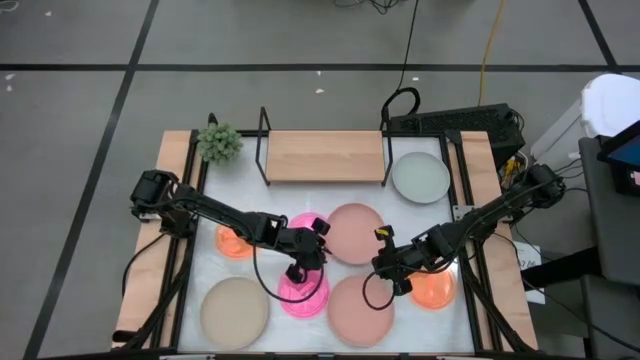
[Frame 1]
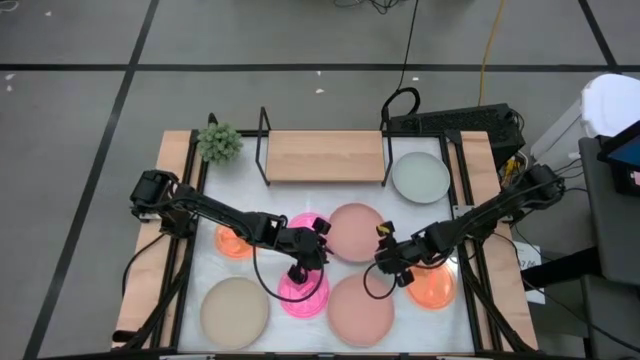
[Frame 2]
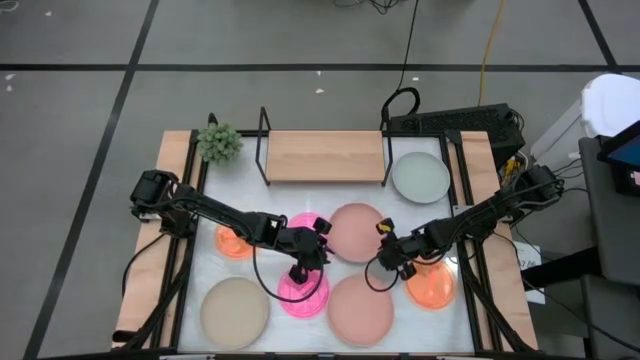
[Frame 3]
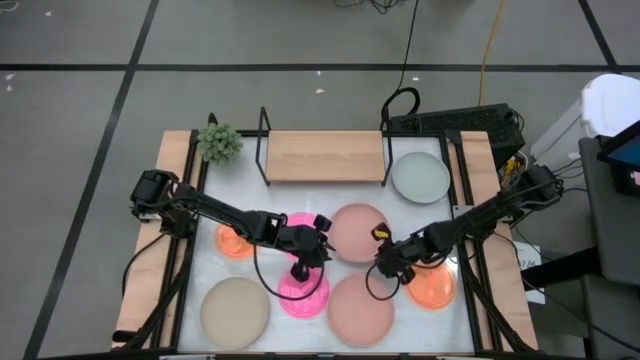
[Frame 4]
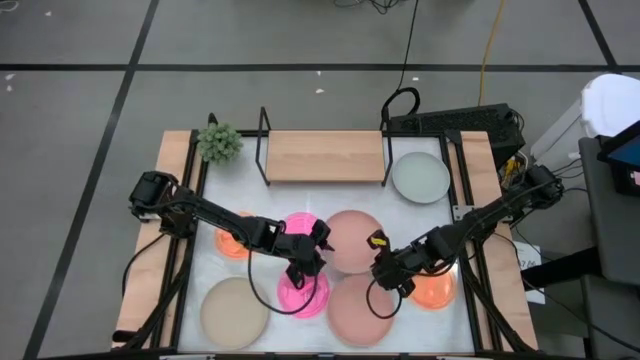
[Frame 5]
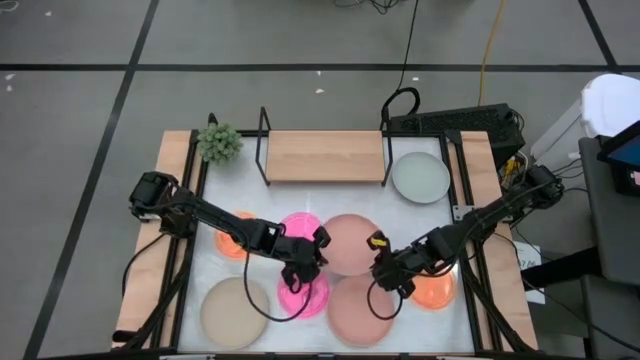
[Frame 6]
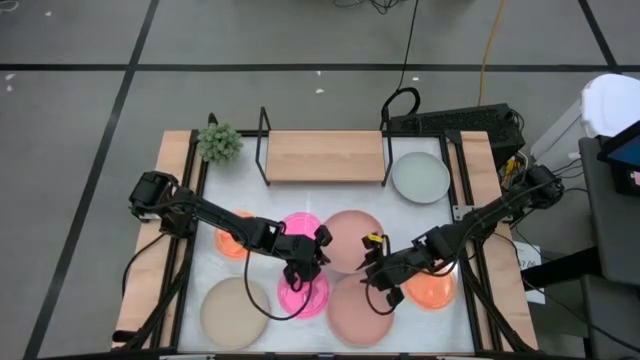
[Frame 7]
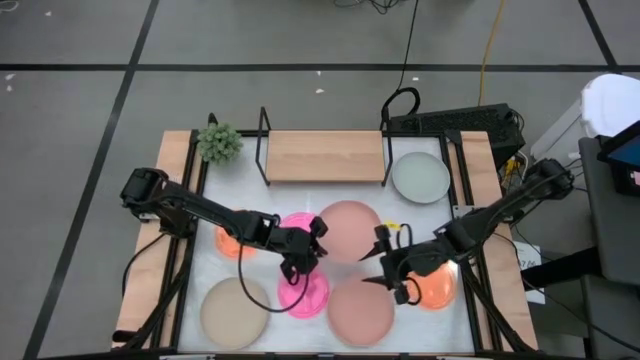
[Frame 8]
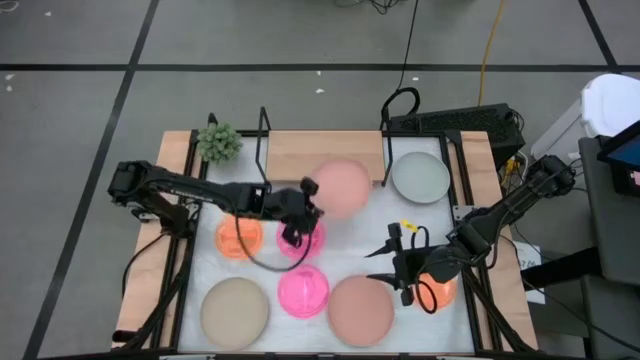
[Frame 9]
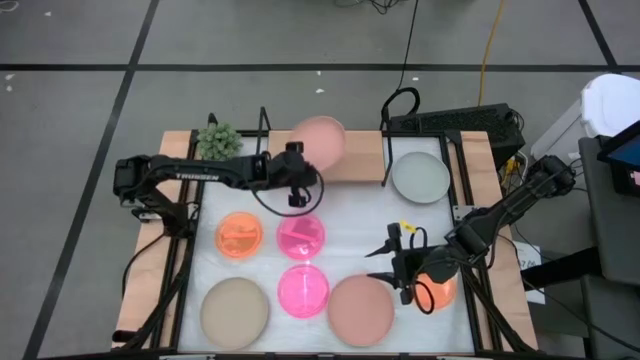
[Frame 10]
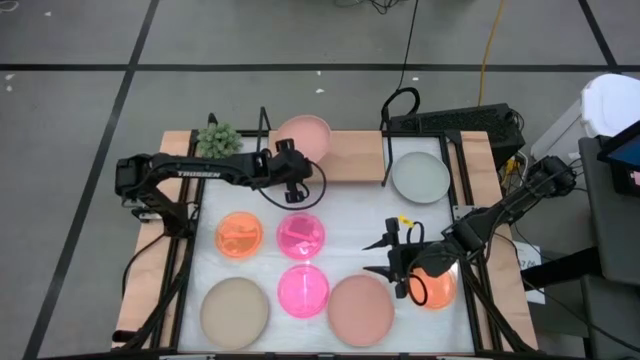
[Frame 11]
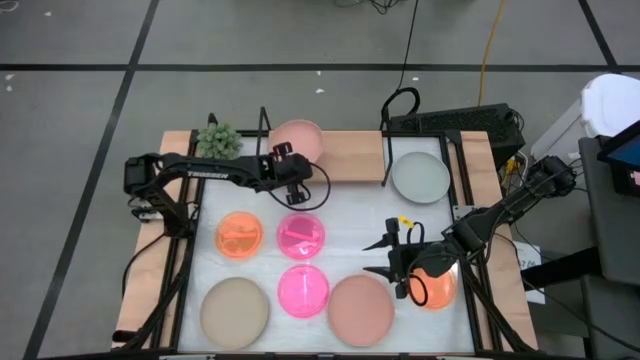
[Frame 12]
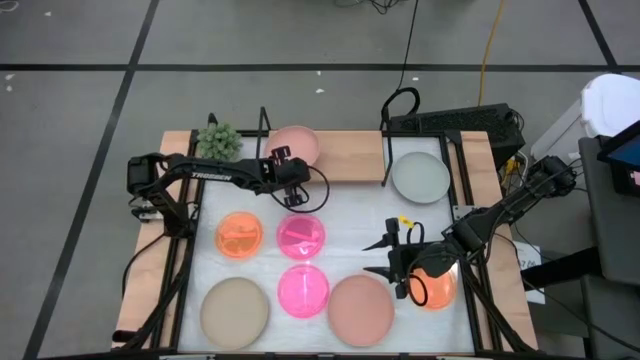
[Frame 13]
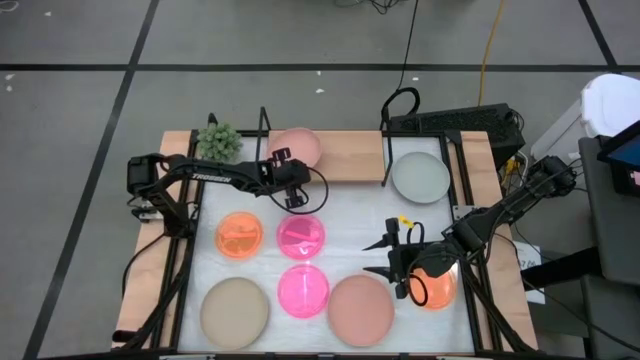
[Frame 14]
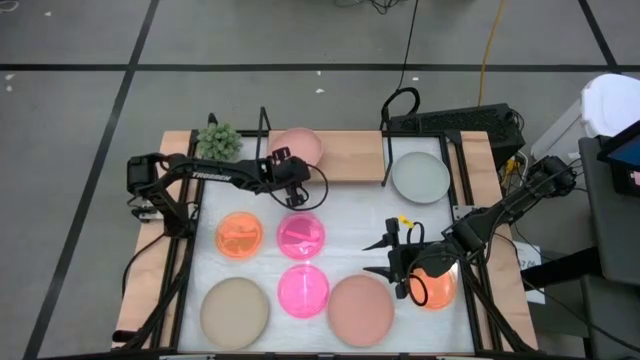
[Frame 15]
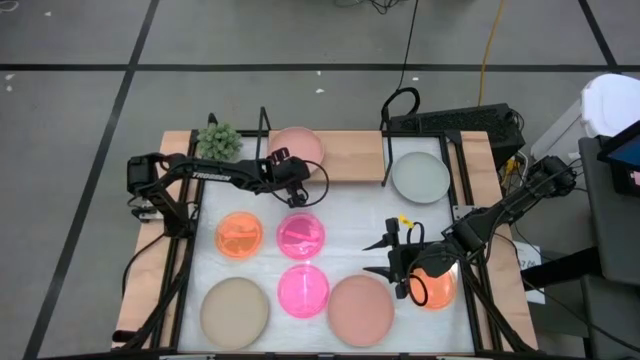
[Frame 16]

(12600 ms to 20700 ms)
Task: Place and stack plates onto a shelf
Put the top light orange plate on the shelf

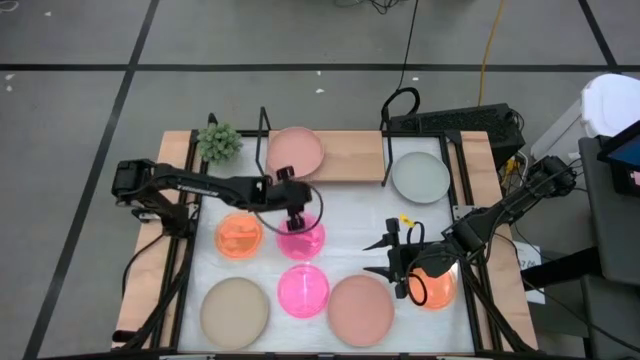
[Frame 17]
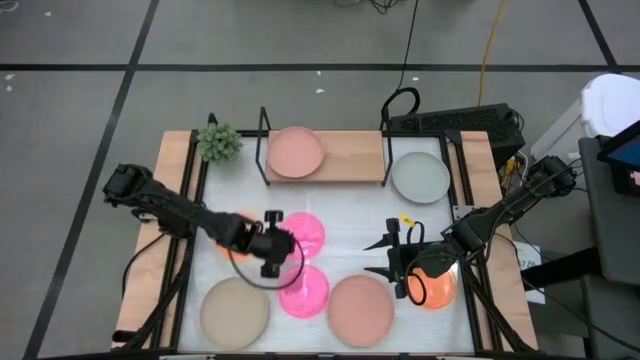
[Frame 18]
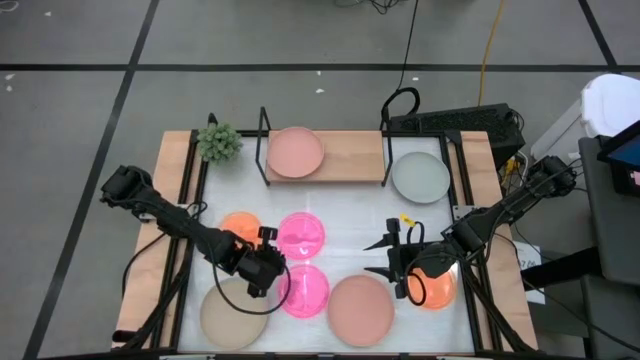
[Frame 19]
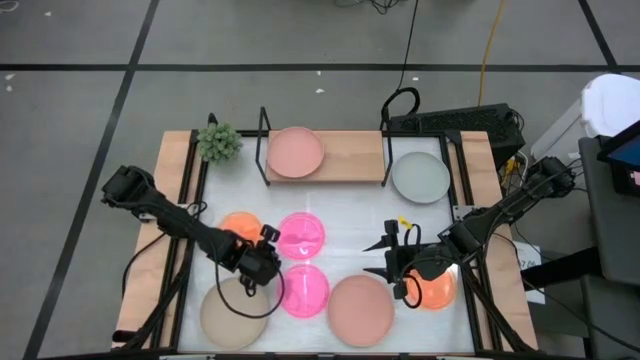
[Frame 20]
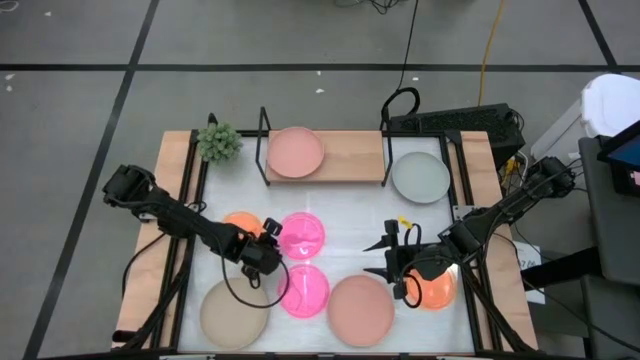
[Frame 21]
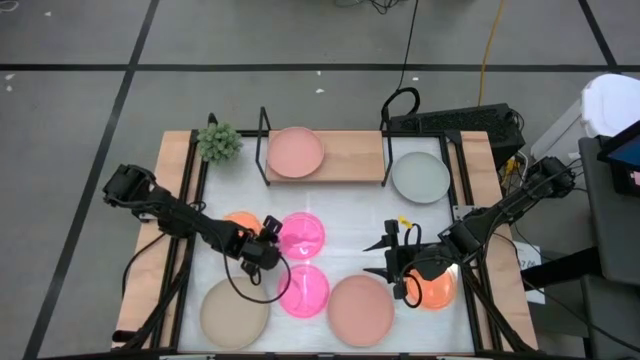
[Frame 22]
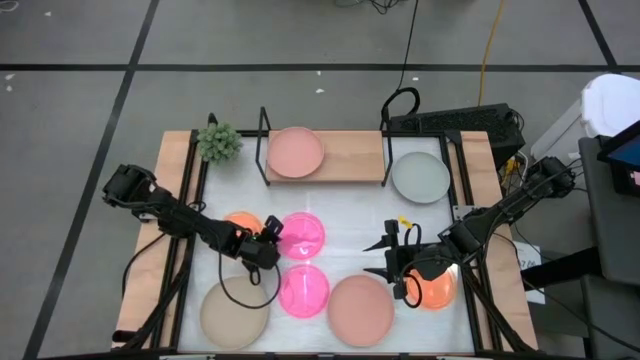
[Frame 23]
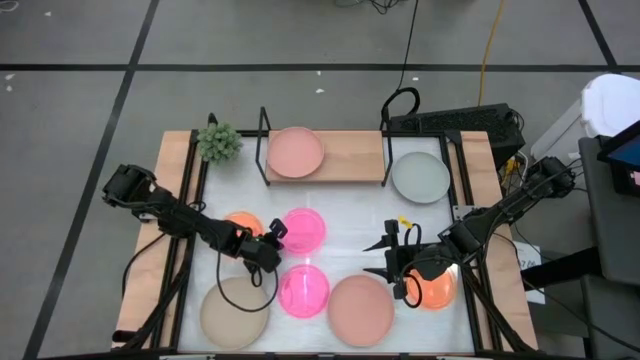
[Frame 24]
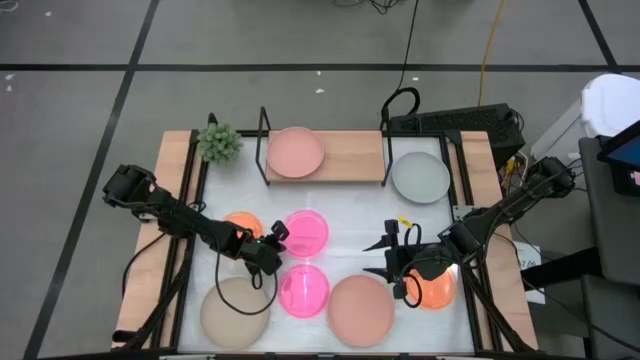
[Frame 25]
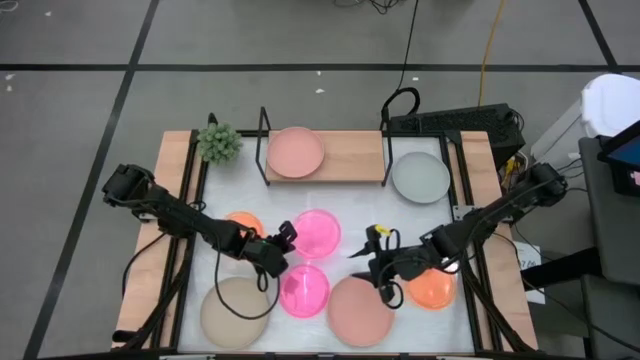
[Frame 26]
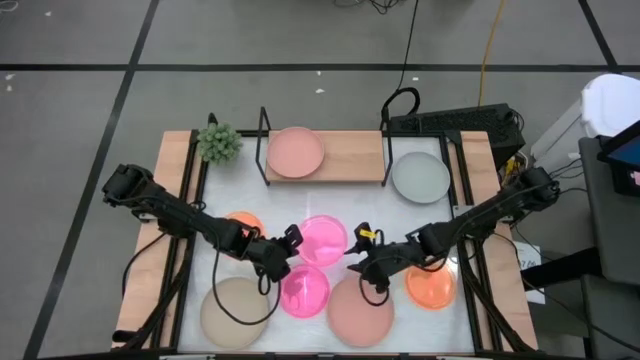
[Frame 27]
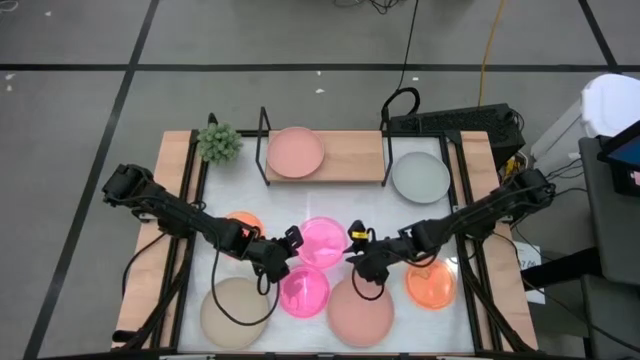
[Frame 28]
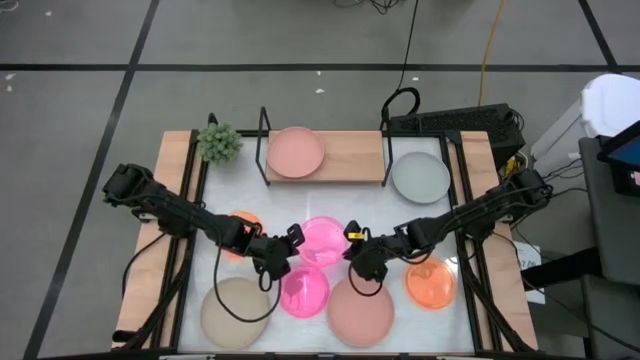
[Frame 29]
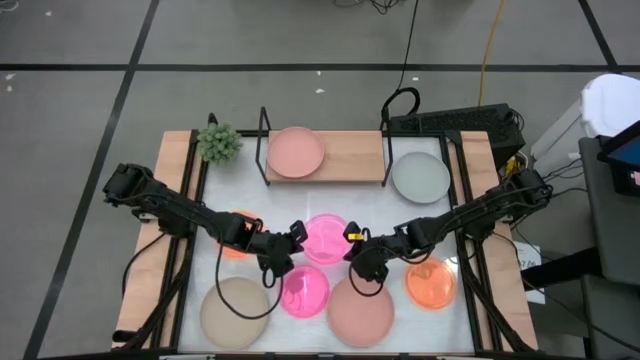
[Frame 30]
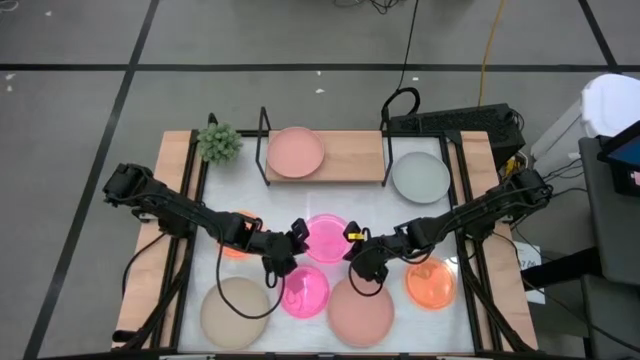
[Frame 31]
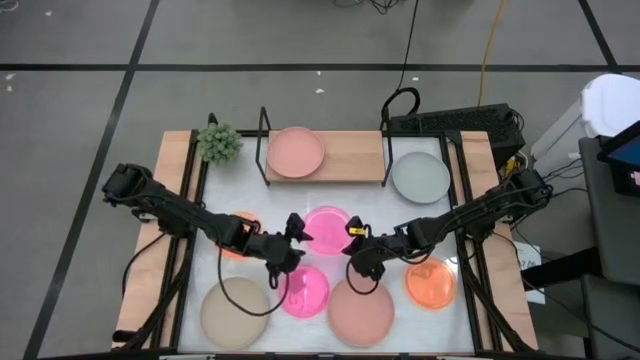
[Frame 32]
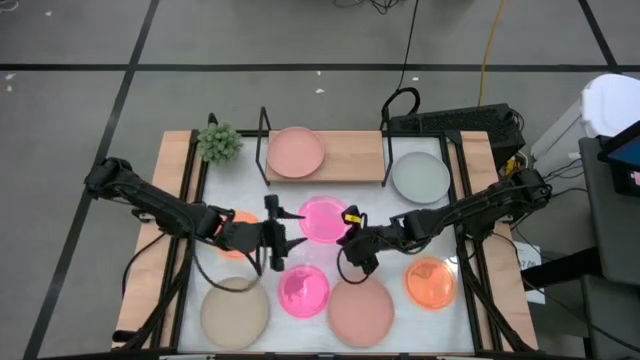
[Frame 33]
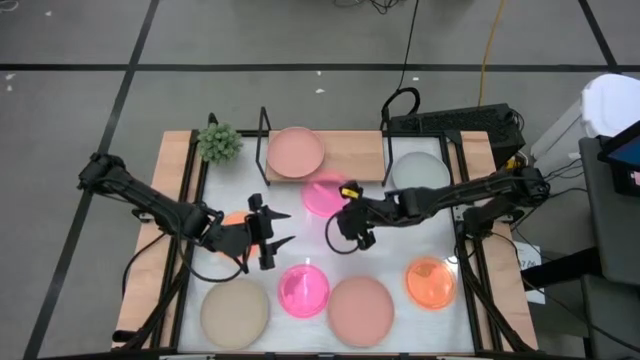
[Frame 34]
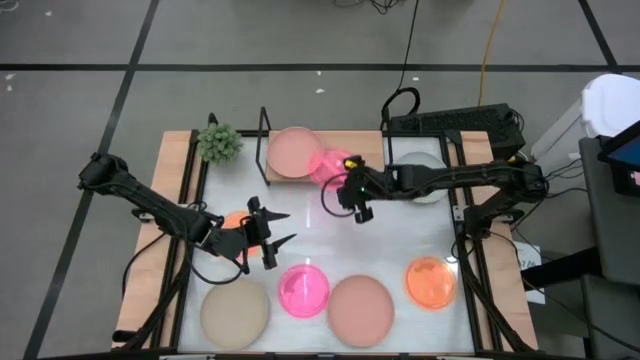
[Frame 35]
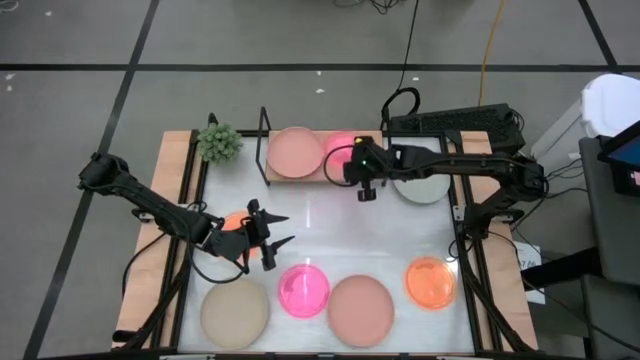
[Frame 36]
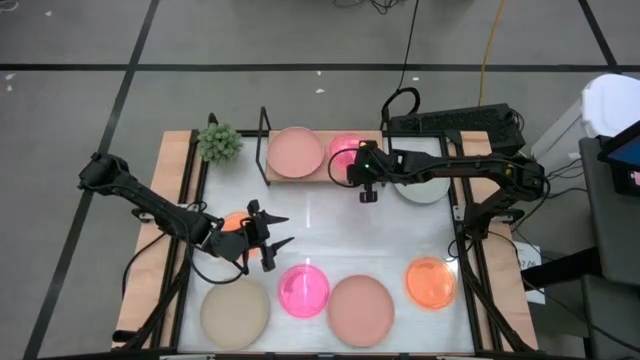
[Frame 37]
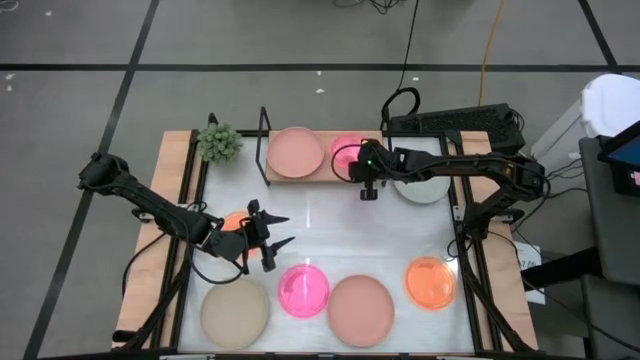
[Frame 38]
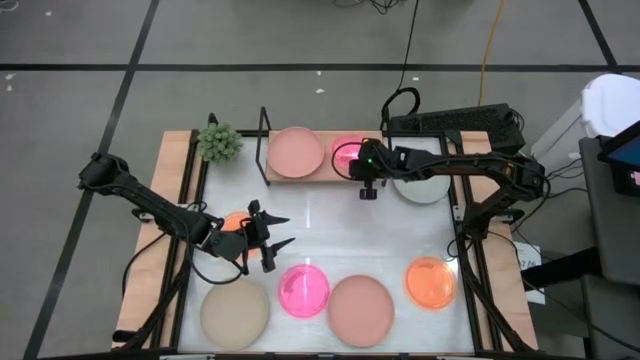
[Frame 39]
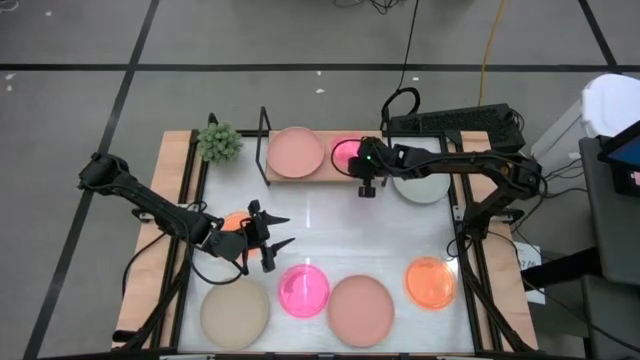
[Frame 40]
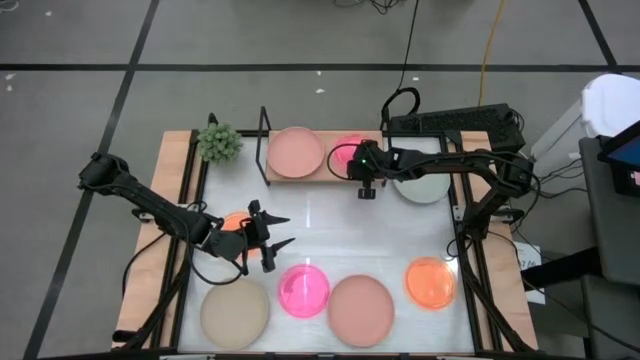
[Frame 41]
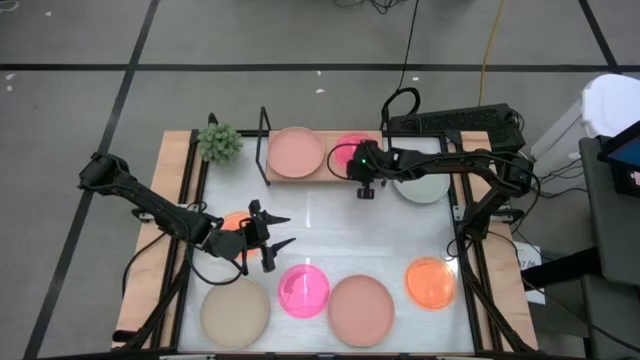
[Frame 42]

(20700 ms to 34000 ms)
Put the top pink plate on the shelf
